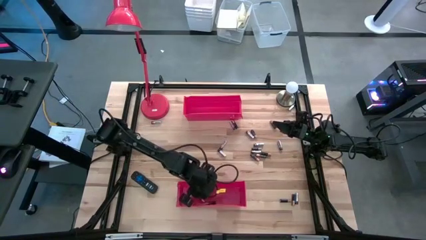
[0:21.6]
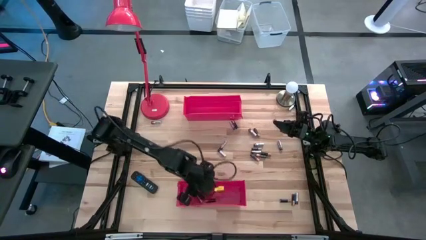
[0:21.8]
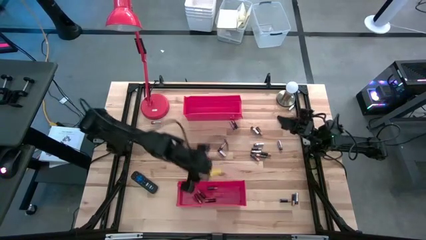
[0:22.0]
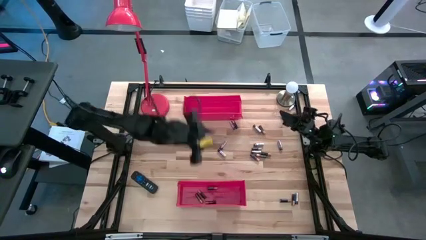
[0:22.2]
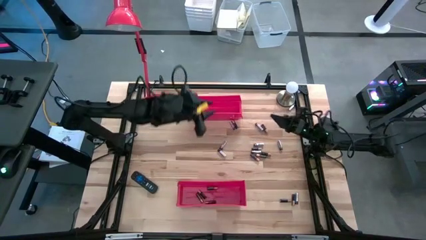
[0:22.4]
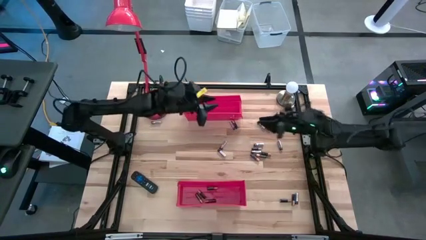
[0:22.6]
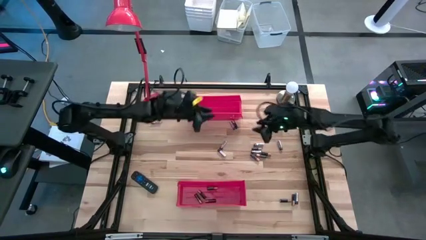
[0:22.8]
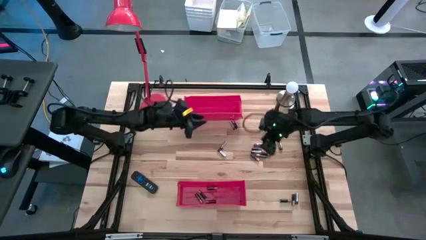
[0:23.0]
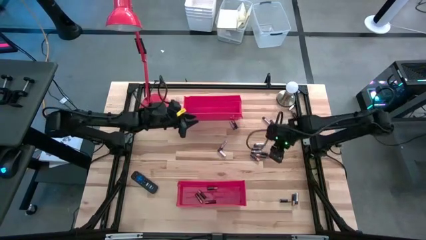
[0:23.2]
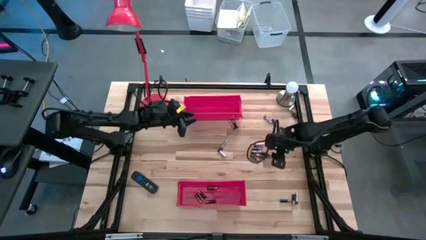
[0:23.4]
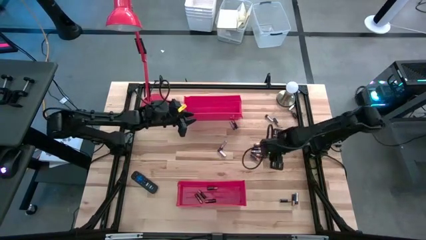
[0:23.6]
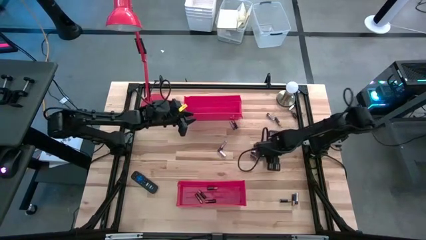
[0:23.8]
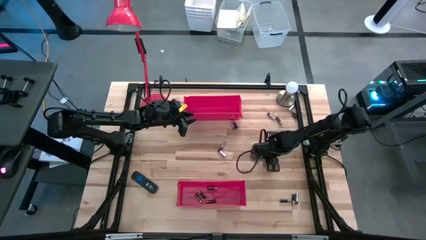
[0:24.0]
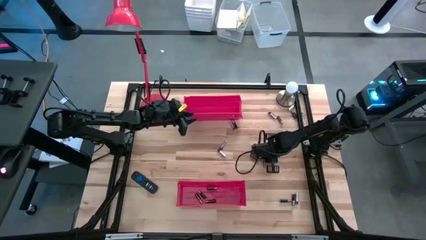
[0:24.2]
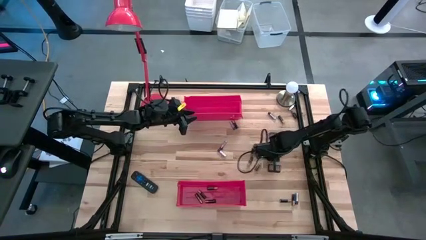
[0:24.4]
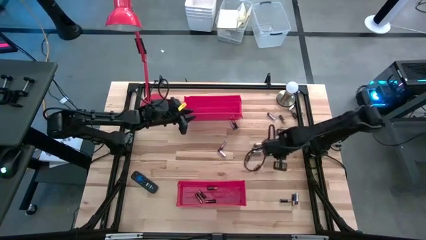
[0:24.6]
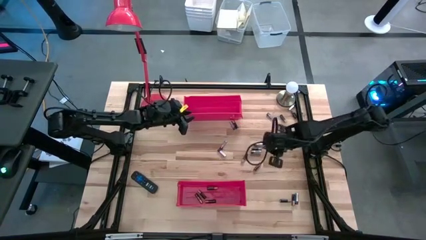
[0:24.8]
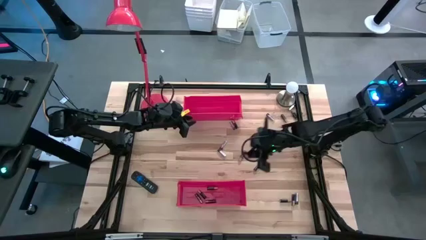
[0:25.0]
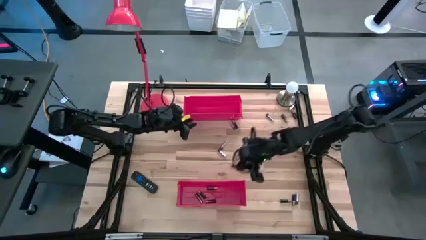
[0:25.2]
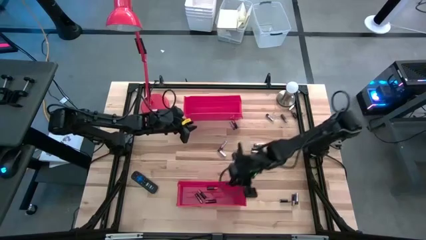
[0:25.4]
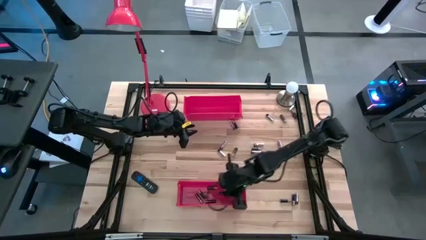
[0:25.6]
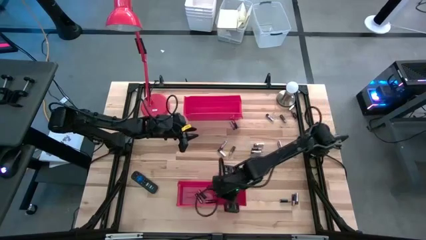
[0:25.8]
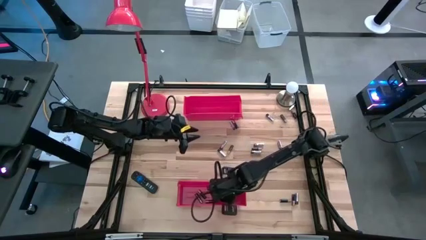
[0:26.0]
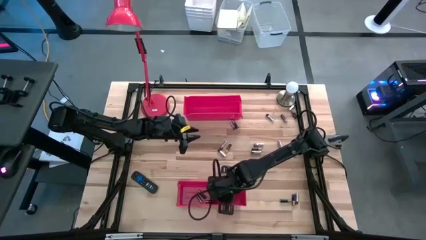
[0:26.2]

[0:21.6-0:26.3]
Task: Sort batteries
Put the brown battery into the bottom red bin

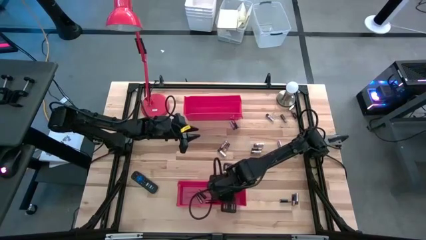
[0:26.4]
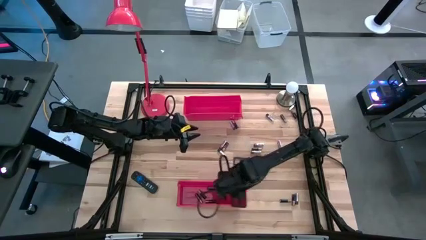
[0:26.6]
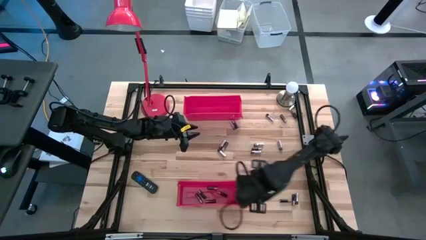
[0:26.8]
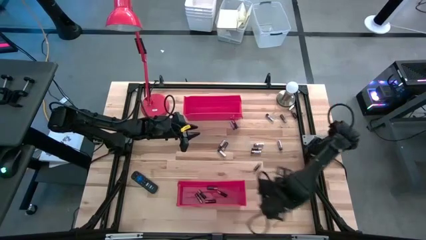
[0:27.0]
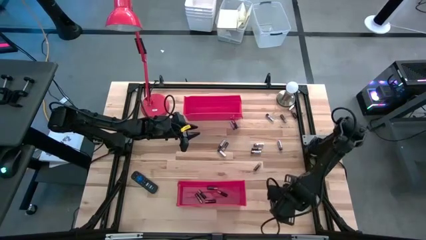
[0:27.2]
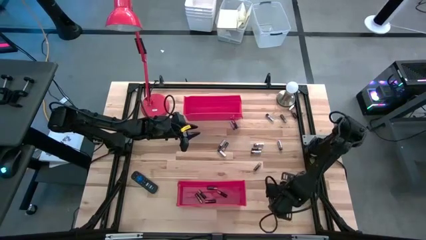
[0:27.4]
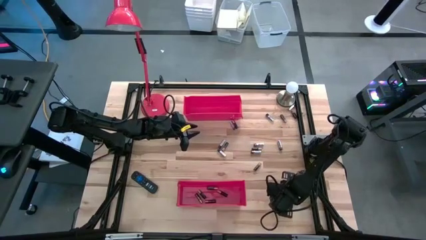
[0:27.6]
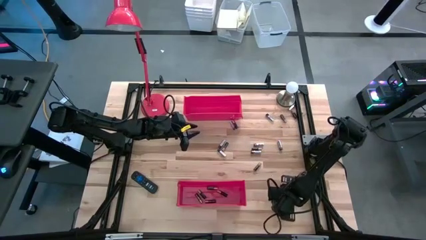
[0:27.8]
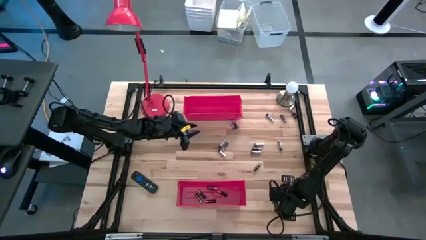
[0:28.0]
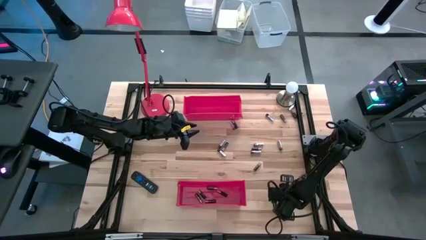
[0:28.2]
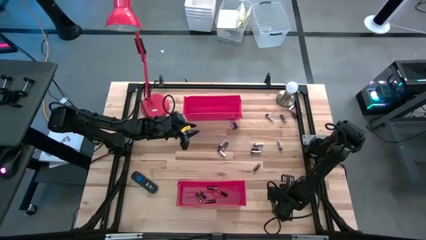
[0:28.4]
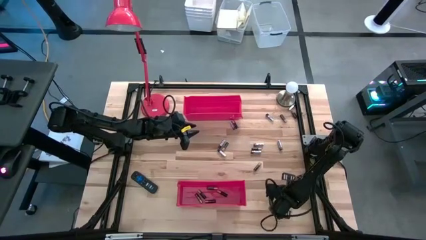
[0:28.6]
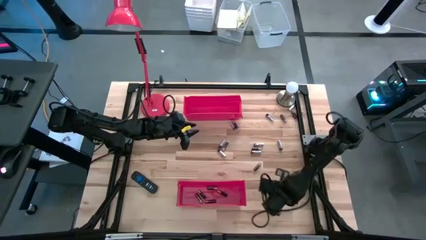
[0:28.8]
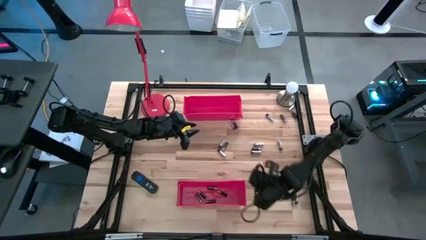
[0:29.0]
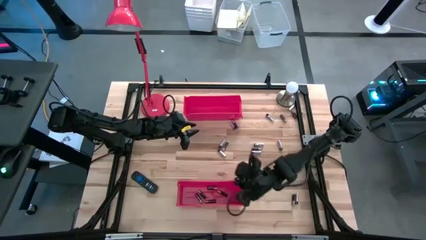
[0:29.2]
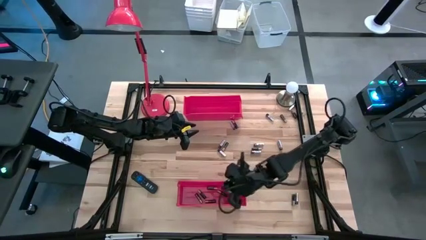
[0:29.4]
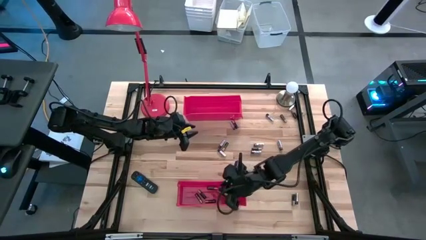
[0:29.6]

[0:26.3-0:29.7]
Put the brown battery into the bottom red bin

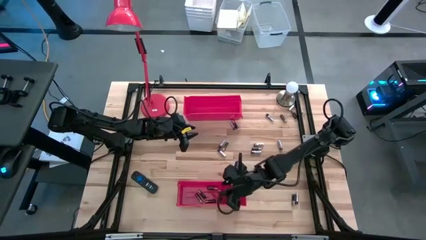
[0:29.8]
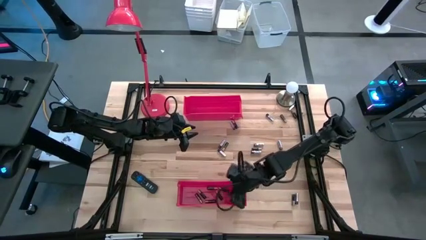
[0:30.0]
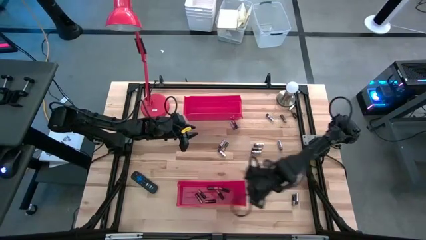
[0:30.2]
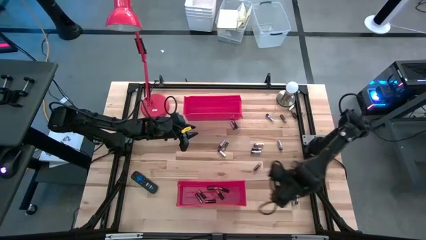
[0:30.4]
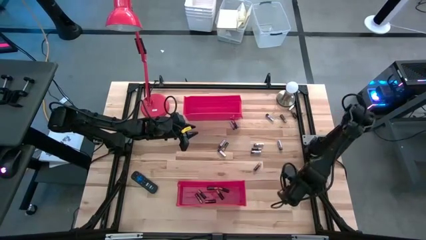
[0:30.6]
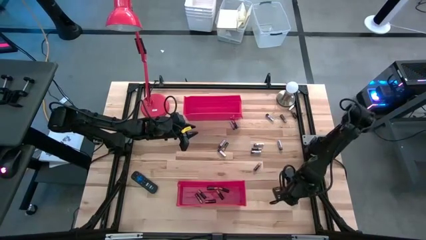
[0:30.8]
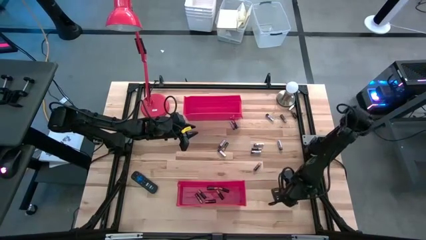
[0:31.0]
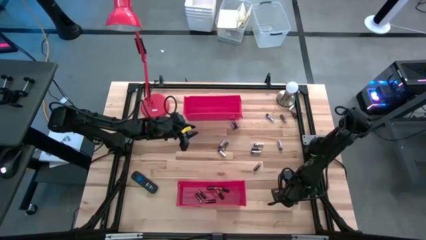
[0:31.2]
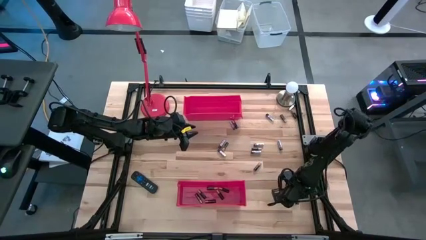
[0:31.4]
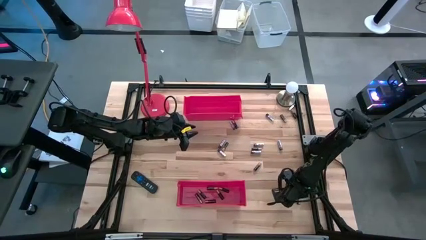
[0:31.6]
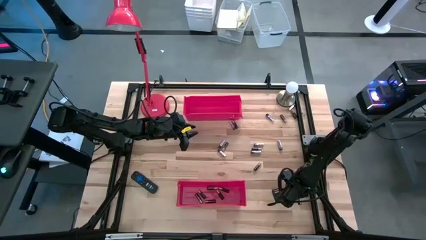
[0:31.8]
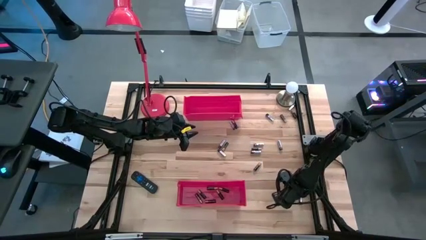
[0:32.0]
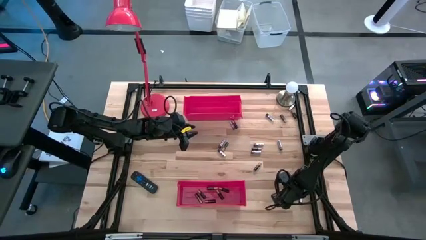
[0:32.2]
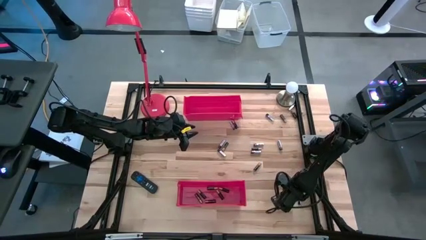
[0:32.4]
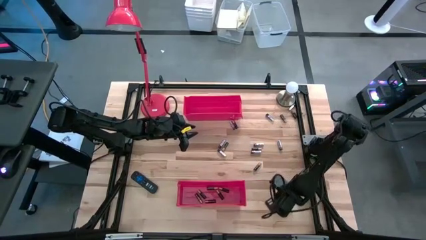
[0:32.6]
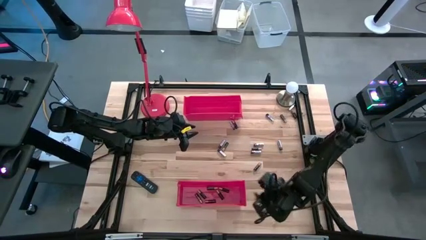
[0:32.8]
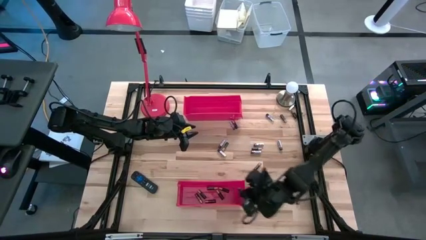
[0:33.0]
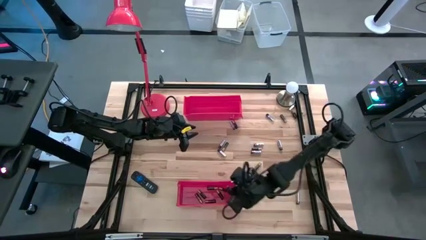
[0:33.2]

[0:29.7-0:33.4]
Put the brown battery into the bottom red bin

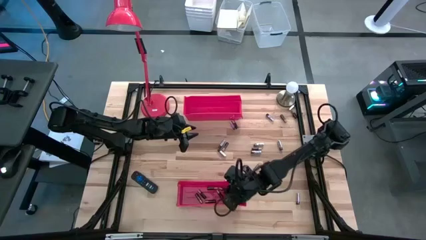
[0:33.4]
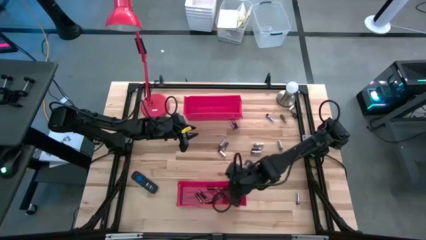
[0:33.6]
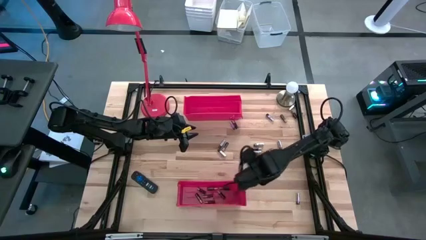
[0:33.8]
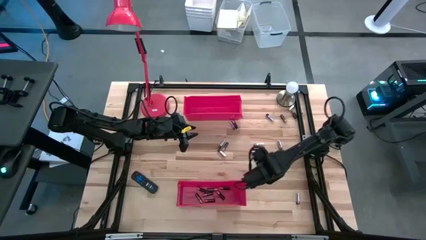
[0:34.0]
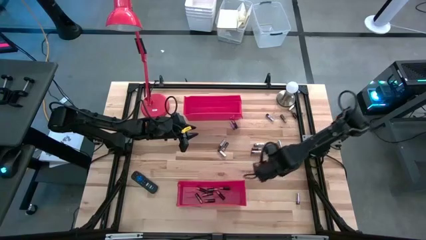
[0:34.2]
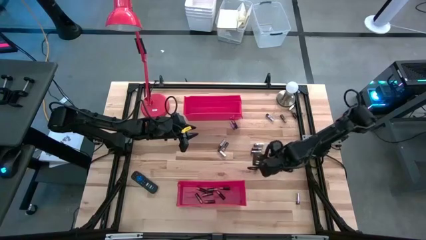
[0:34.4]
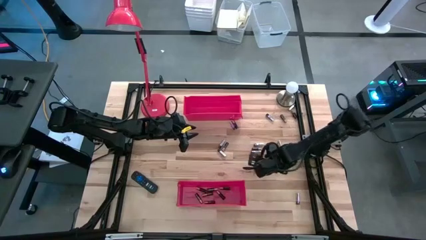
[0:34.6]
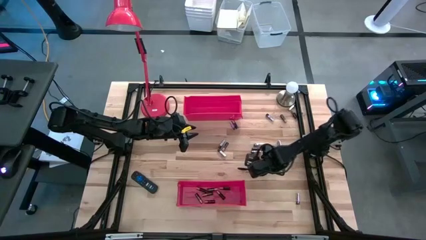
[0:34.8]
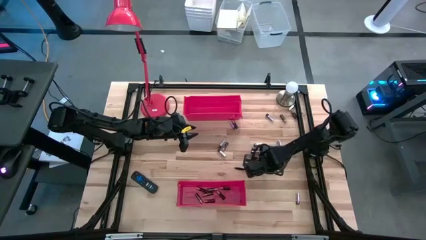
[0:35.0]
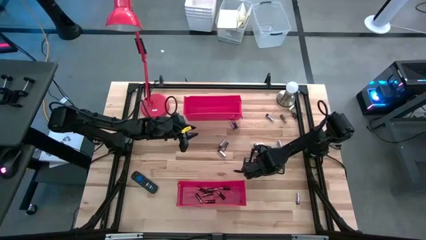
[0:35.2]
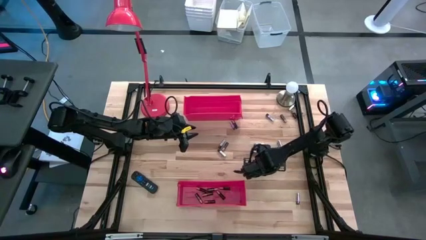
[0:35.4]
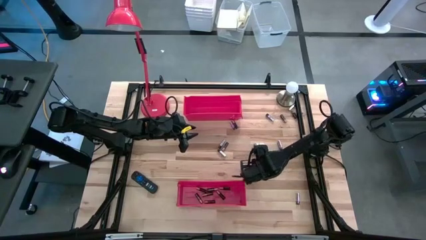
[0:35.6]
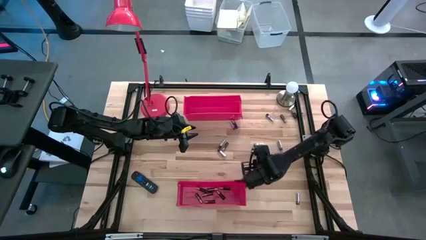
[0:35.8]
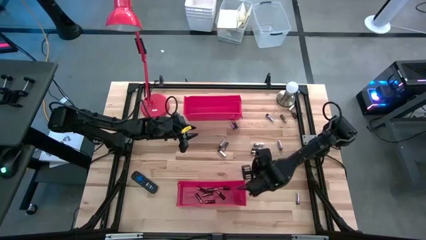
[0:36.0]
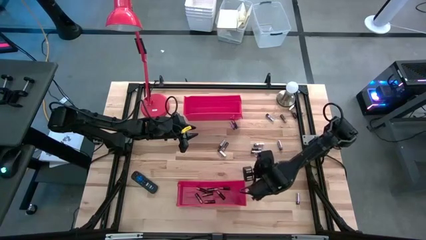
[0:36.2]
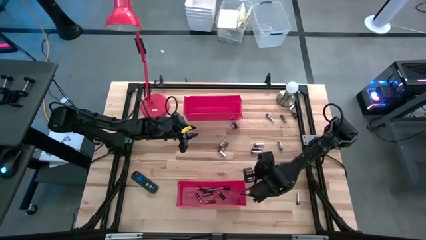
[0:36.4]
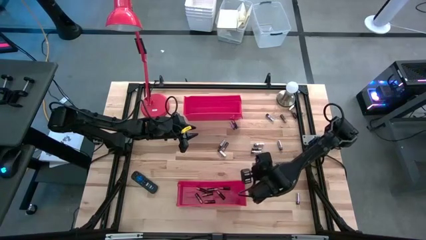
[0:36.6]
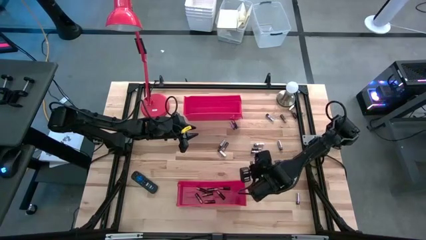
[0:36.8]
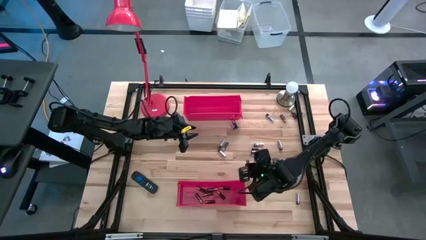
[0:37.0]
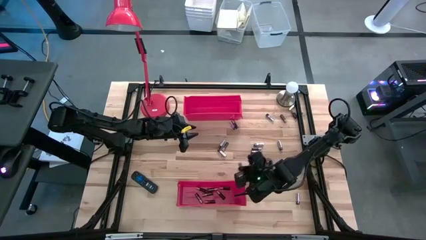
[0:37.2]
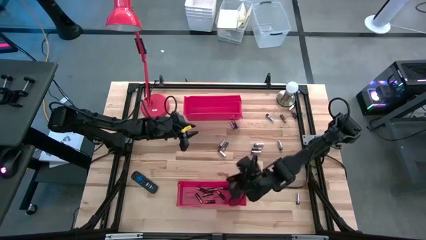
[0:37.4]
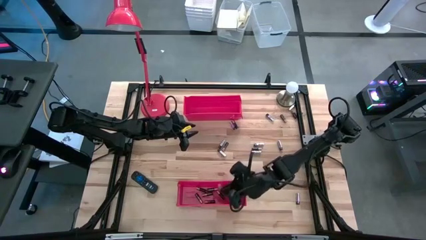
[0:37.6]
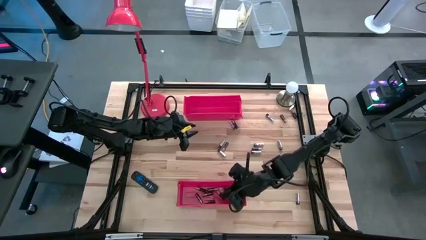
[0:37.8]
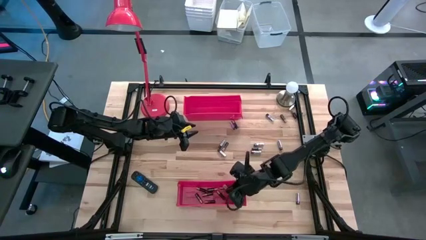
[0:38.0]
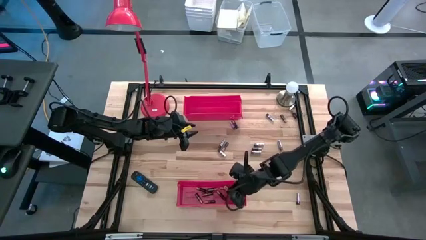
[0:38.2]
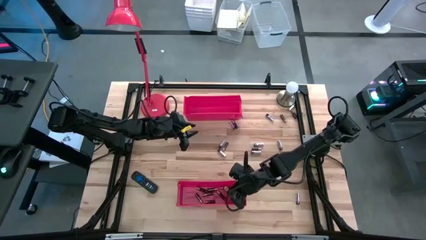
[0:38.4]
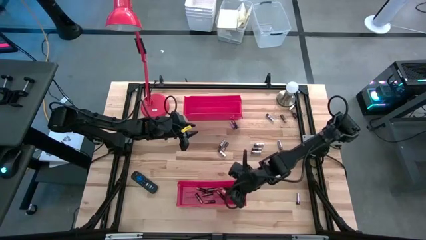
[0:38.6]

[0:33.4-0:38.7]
Put the brown battery into the bottom red bin
